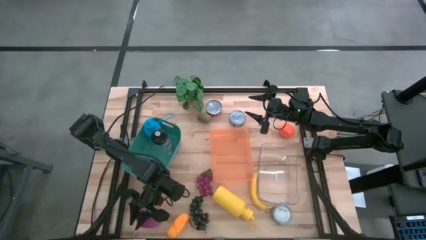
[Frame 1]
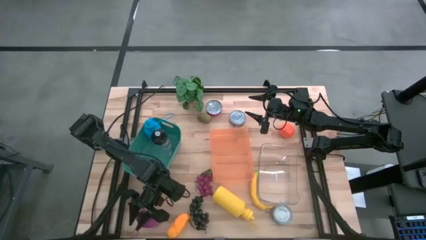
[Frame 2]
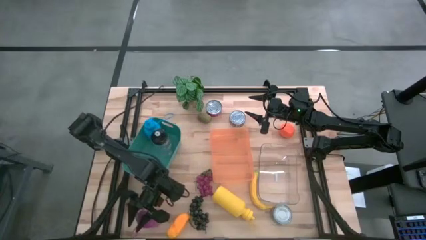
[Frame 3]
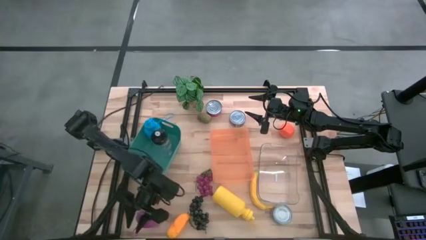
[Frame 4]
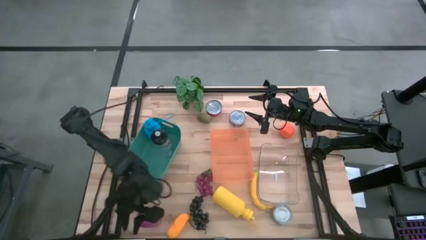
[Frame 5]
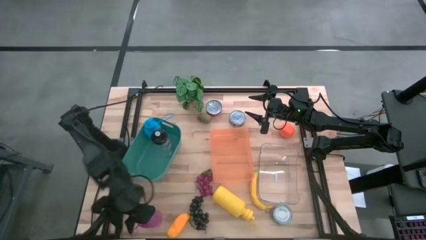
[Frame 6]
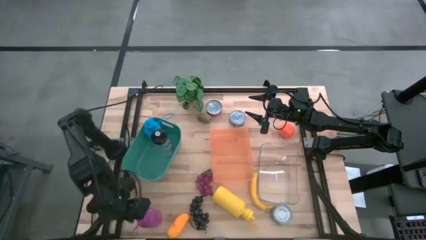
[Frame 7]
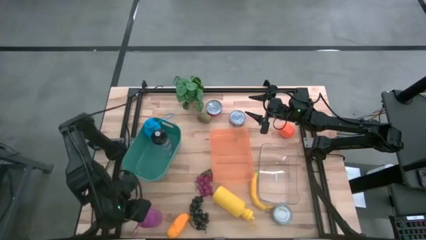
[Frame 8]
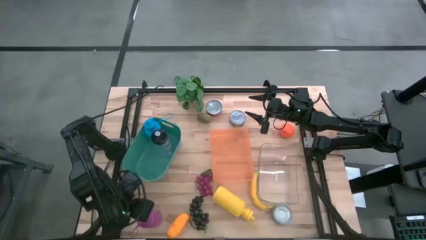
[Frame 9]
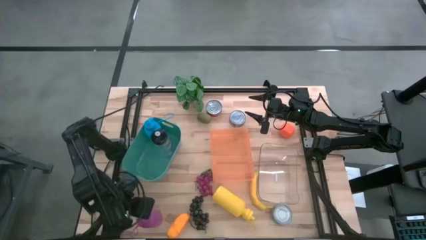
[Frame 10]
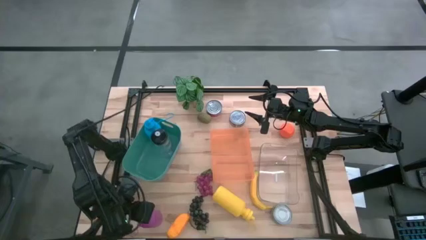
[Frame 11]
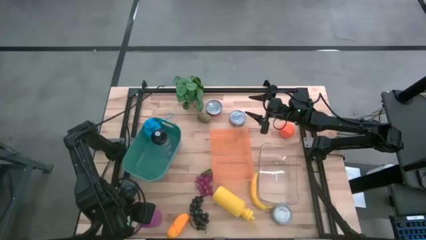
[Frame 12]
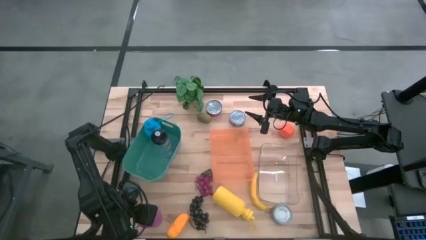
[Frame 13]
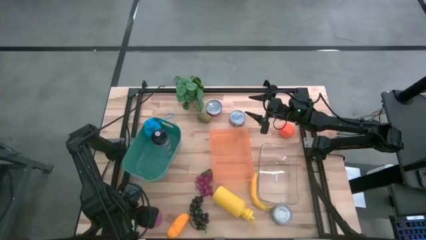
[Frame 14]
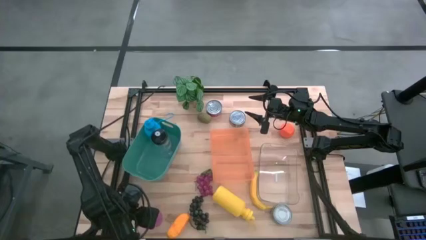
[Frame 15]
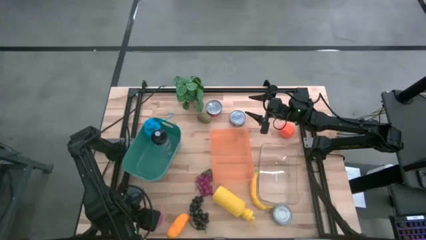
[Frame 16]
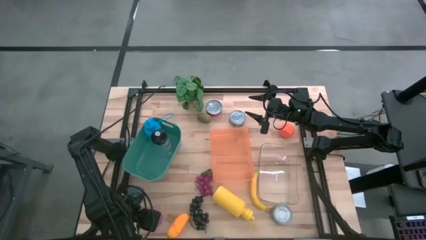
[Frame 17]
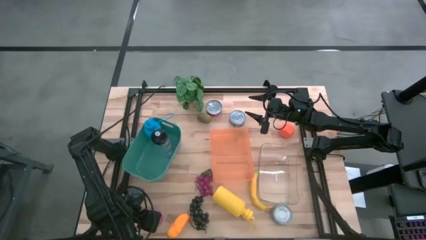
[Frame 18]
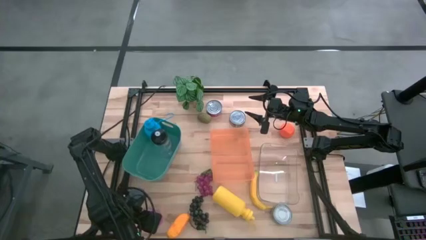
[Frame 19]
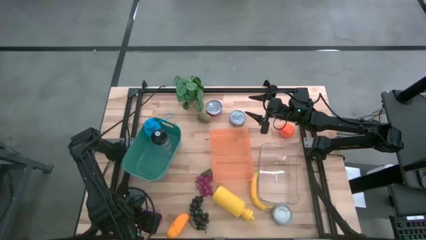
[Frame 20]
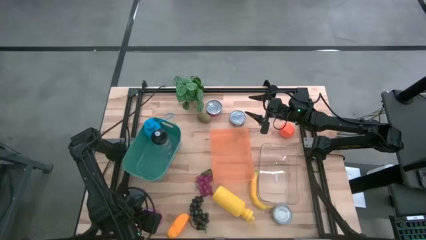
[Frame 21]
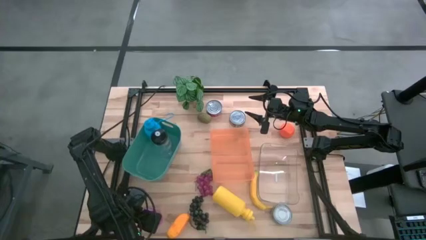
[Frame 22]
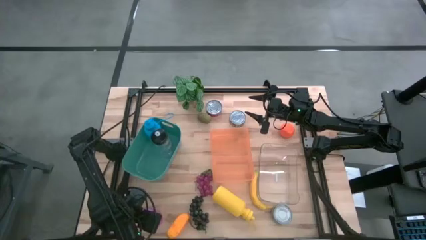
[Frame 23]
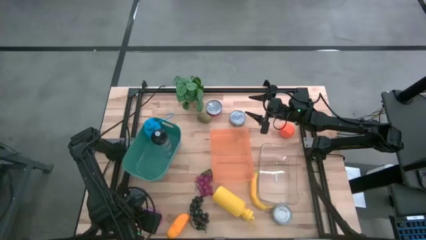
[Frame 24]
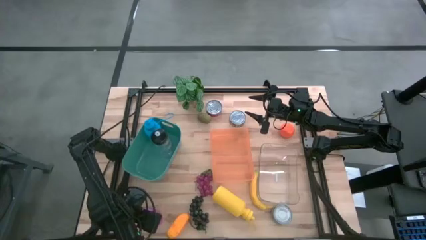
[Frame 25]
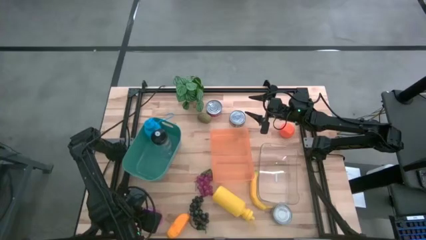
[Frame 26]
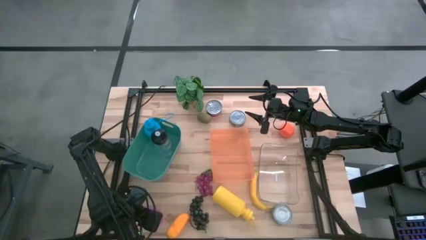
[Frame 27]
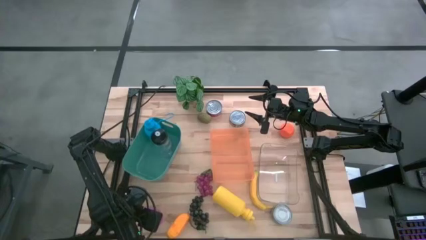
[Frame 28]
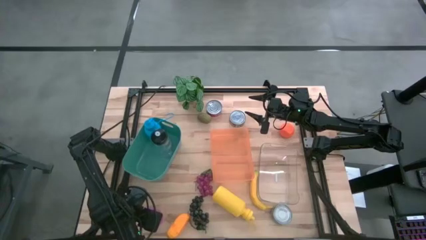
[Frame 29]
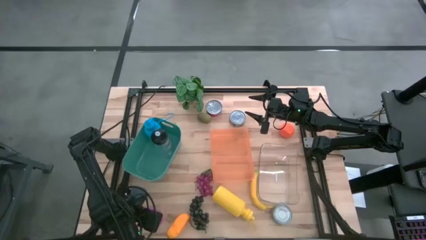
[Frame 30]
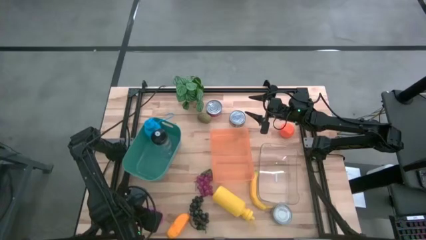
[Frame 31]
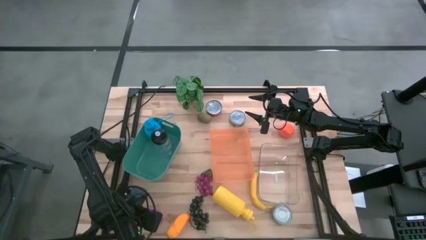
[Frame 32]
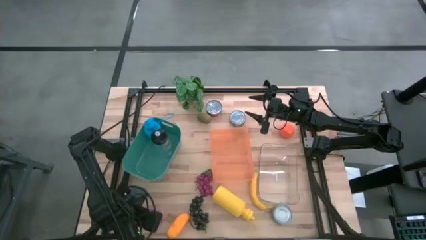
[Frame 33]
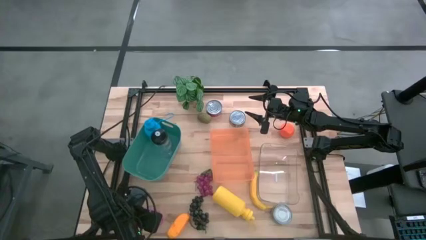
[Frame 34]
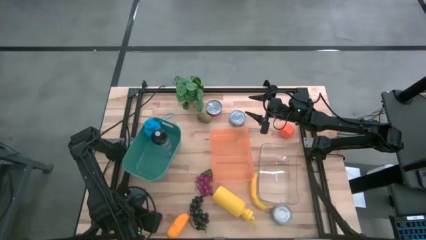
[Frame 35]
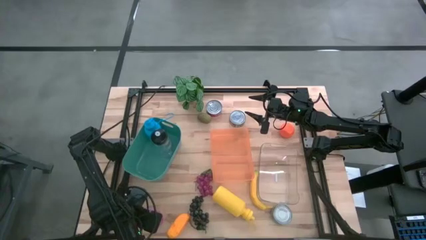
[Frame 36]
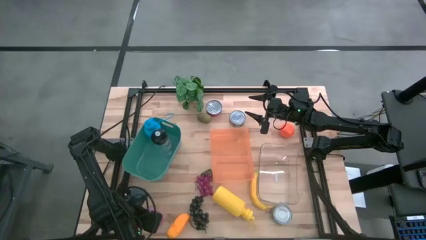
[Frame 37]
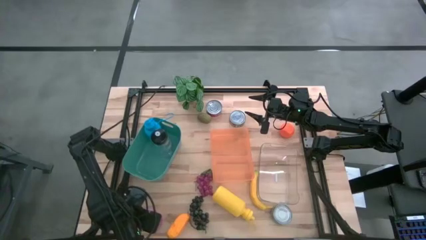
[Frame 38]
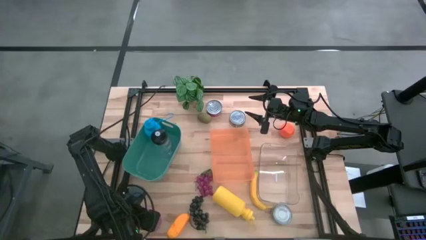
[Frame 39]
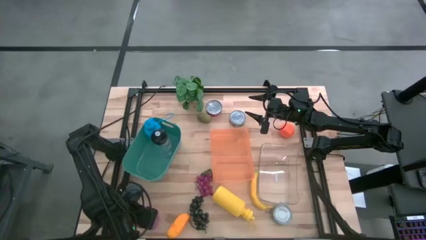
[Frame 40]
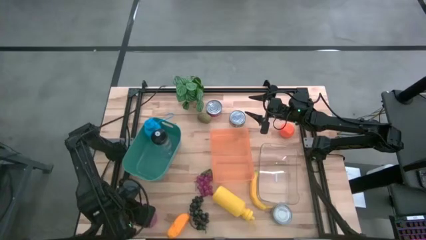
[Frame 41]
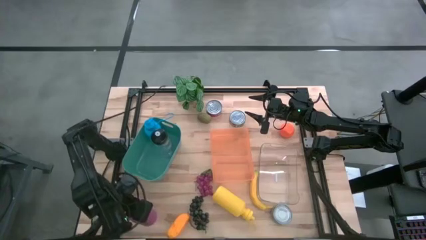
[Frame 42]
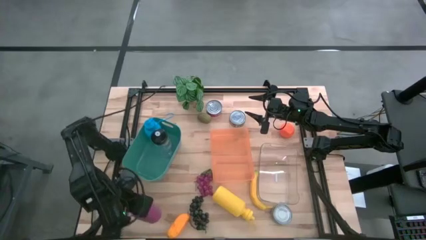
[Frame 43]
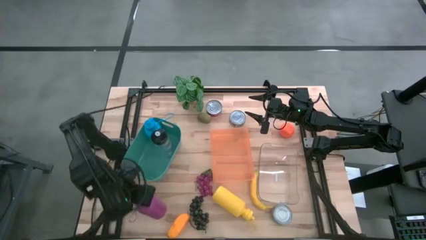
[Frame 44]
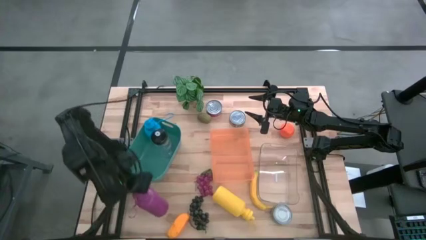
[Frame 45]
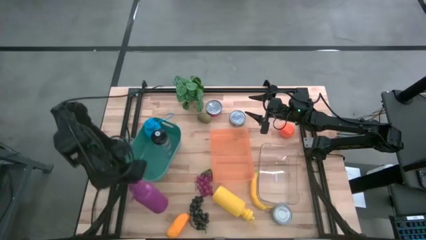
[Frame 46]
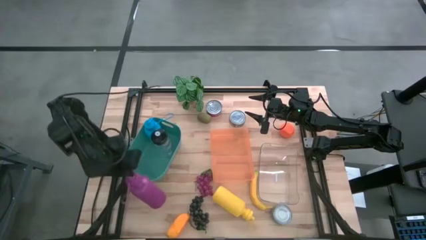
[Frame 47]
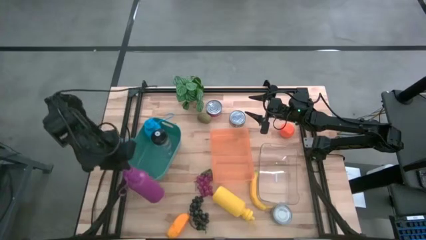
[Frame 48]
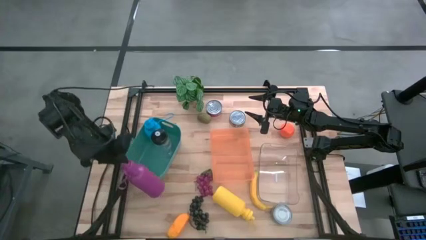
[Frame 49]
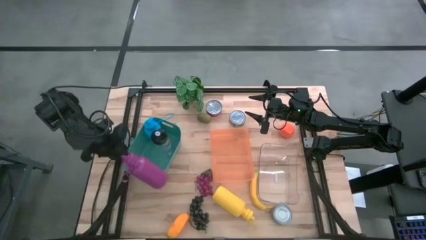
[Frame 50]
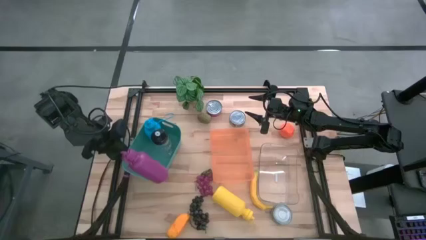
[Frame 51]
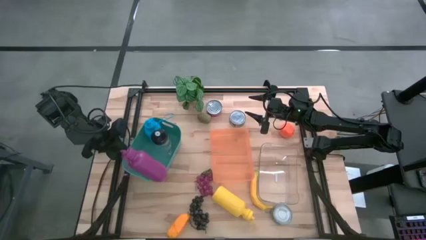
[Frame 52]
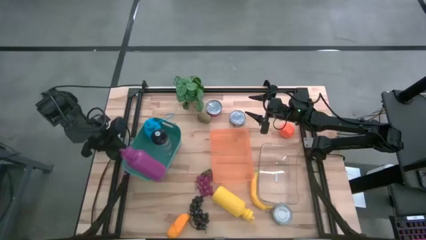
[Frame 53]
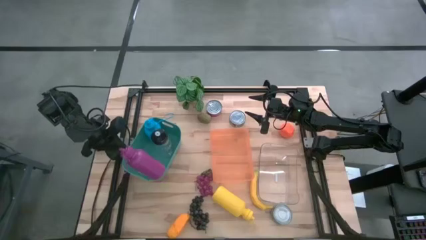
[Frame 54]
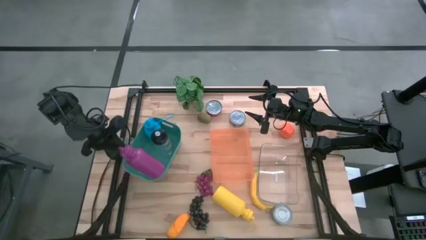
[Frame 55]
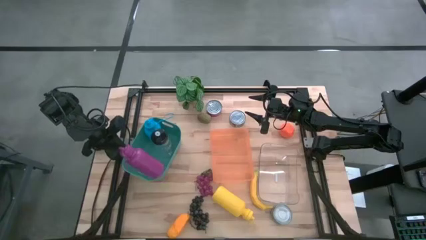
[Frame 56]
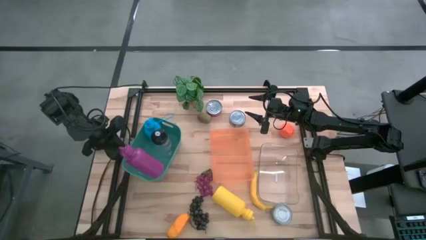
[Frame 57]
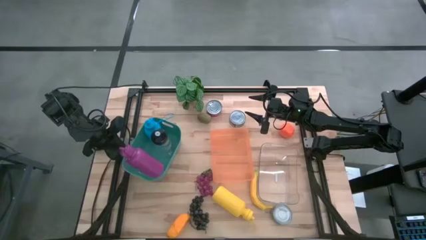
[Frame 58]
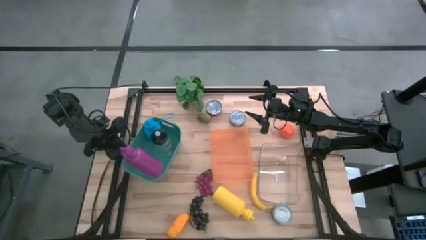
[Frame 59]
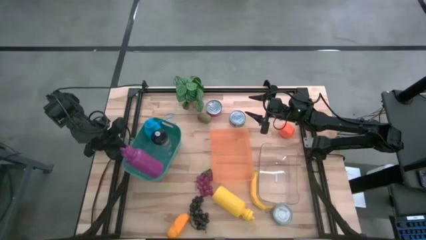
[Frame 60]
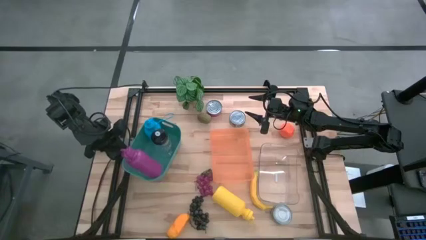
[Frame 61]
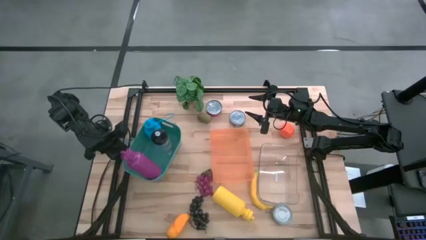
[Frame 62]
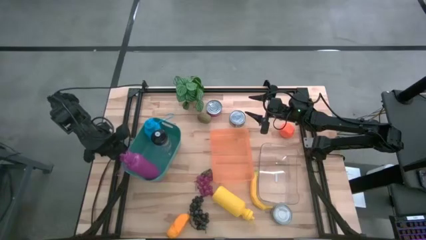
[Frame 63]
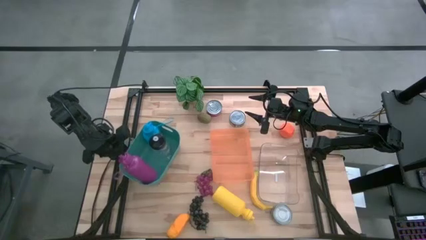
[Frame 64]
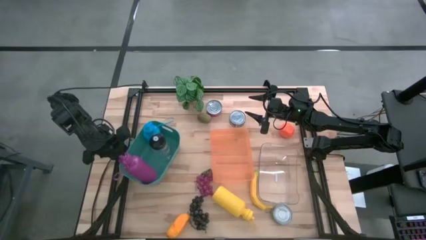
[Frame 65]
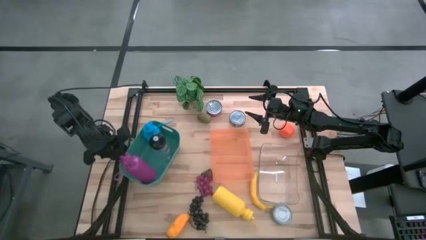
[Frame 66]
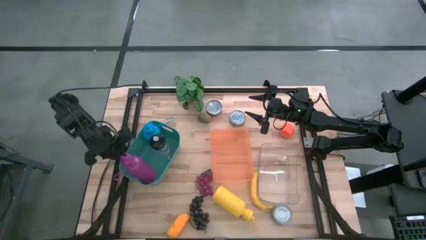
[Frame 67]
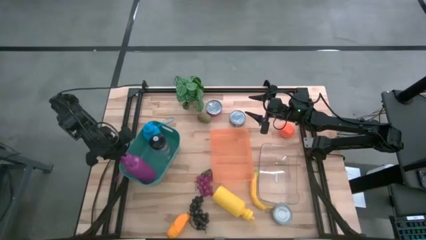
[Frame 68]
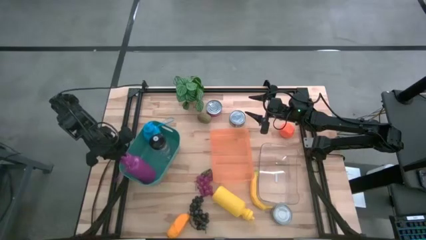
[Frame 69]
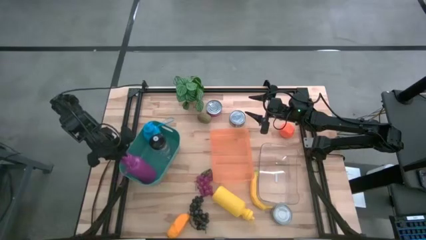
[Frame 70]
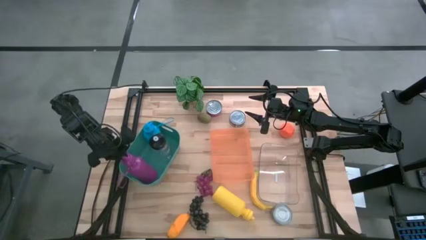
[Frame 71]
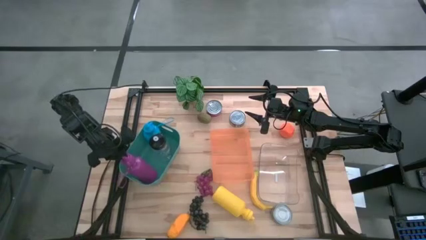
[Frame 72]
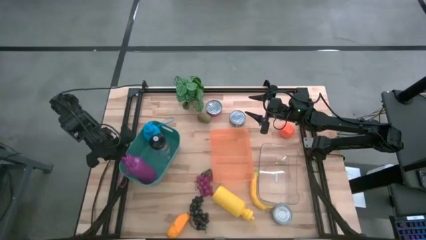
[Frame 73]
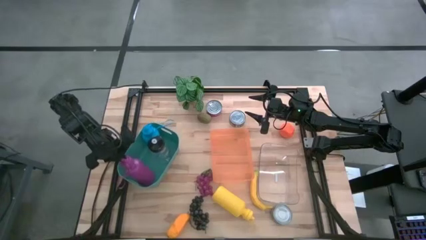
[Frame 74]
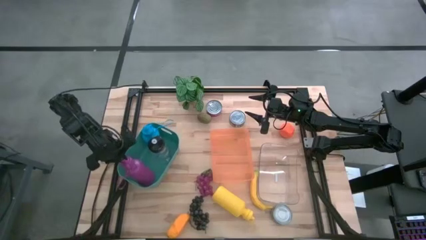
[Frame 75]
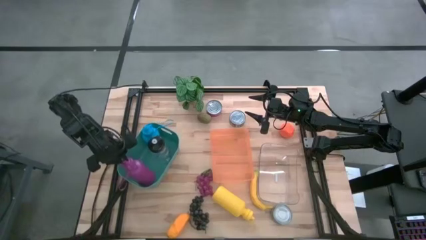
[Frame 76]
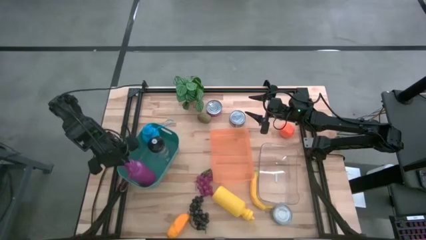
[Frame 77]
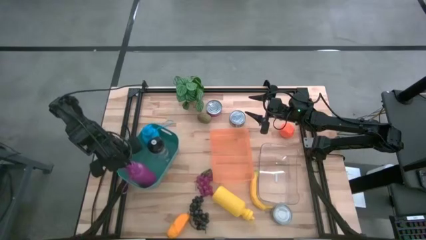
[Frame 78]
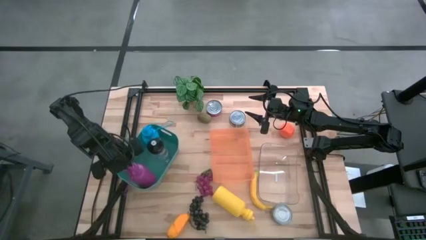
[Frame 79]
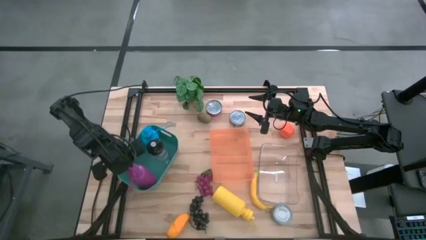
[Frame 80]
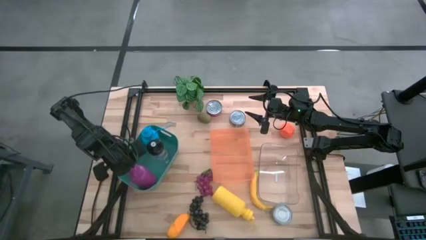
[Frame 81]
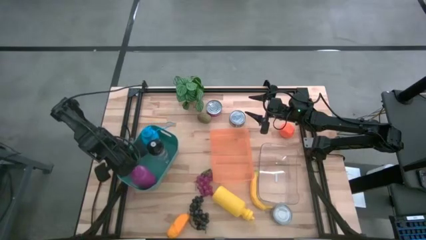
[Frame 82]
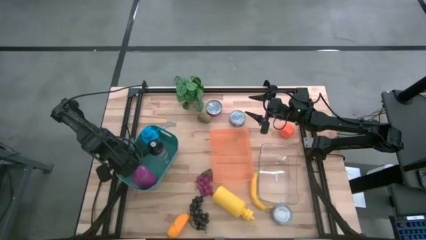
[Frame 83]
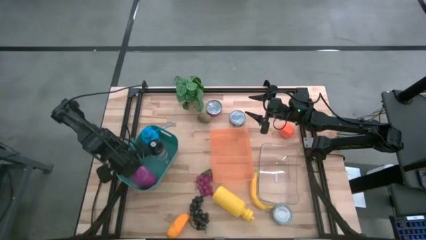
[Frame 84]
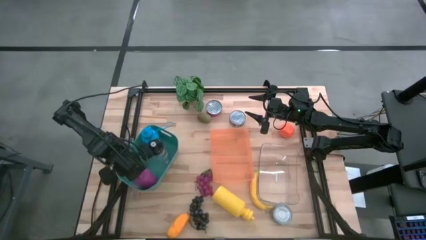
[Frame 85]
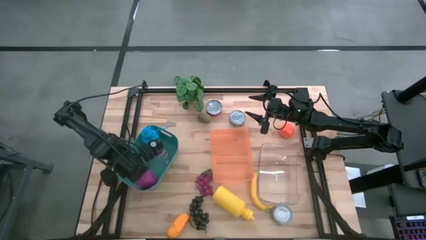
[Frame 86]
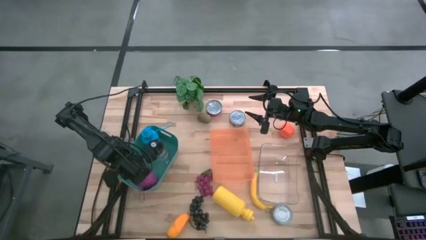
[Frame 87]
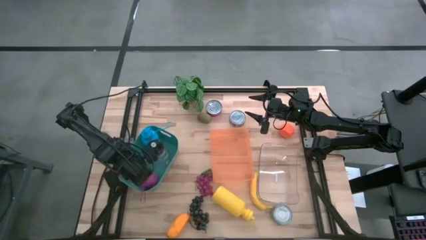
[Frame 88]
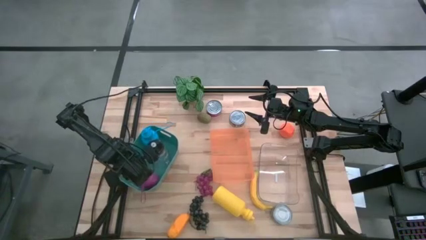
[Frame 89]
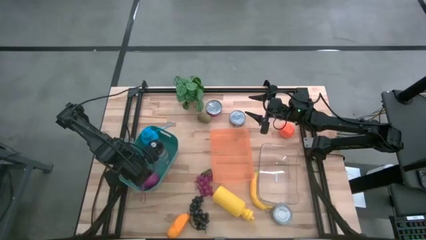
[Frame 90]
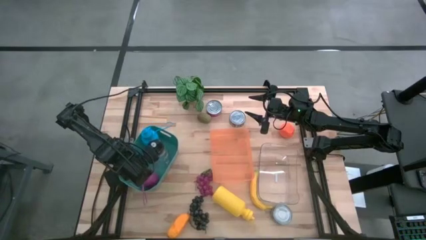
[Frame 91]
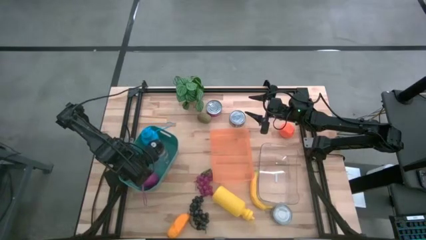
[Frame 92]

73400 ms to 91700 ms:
Task: Pick & Place Food Item
Put the violet water bottle into the green bin
